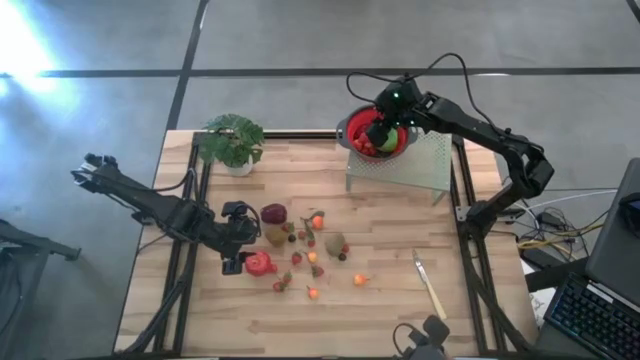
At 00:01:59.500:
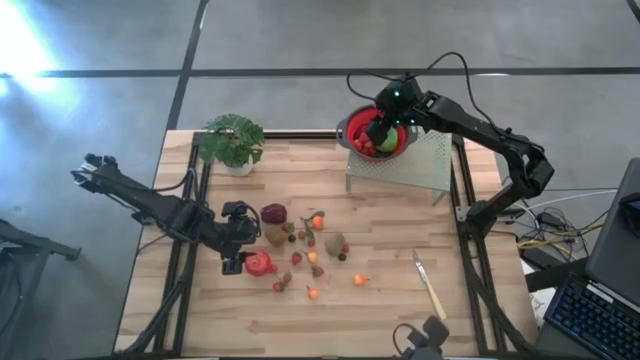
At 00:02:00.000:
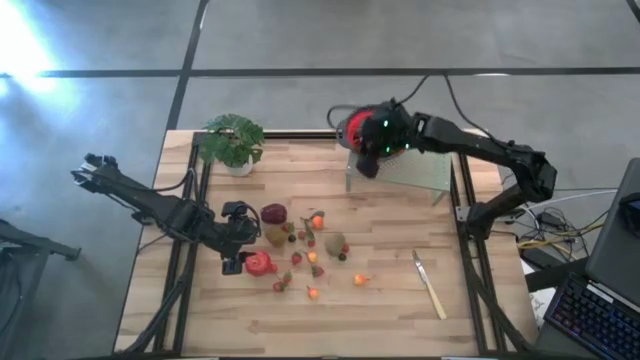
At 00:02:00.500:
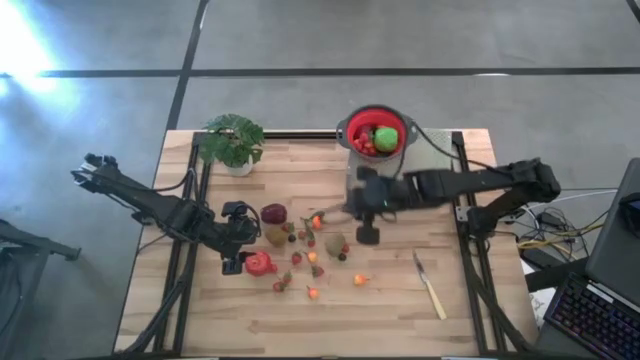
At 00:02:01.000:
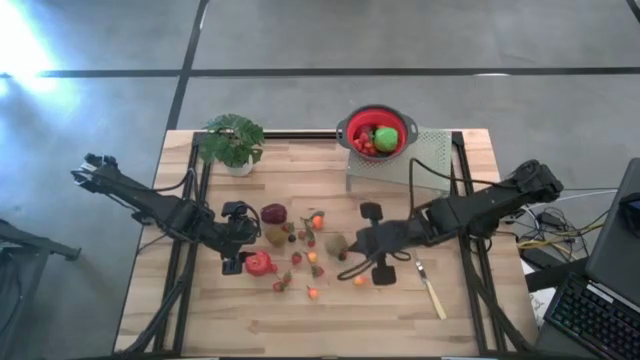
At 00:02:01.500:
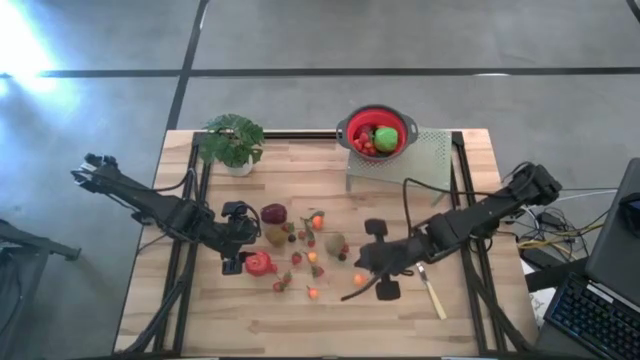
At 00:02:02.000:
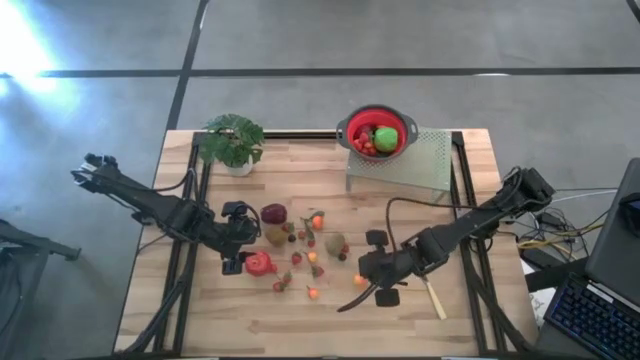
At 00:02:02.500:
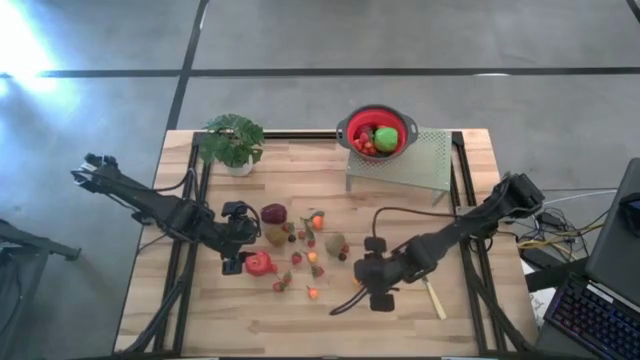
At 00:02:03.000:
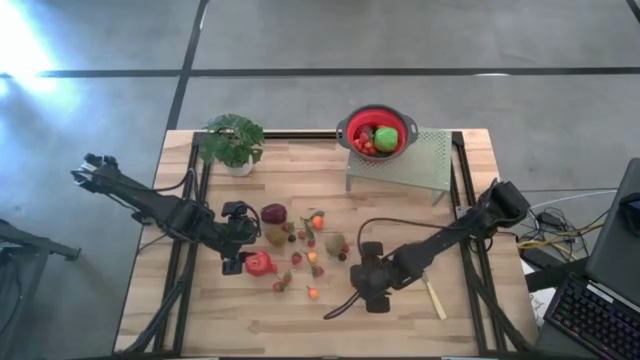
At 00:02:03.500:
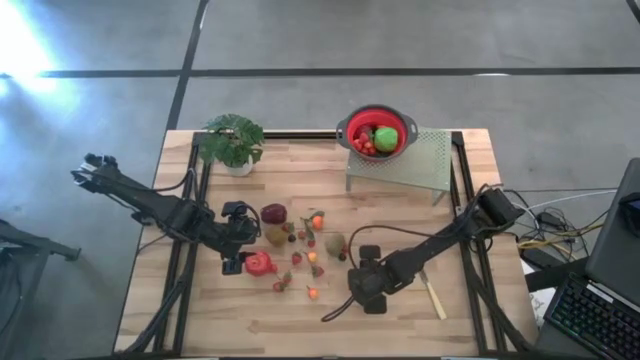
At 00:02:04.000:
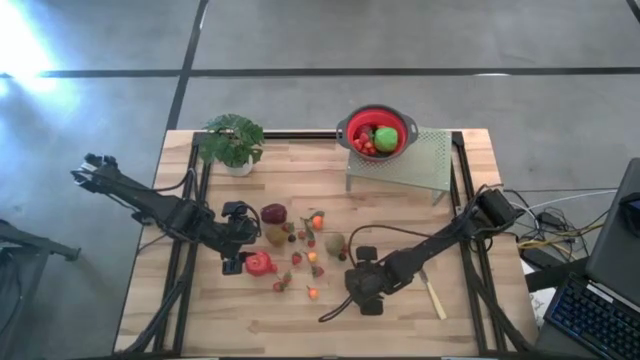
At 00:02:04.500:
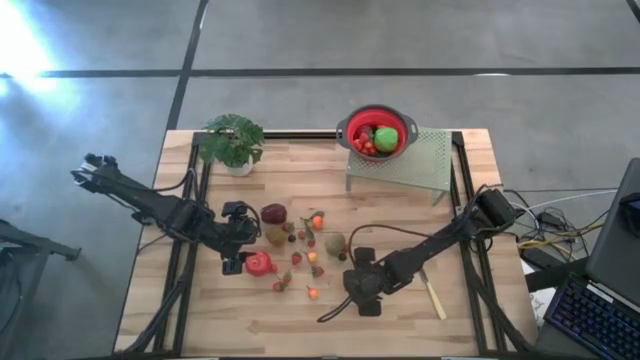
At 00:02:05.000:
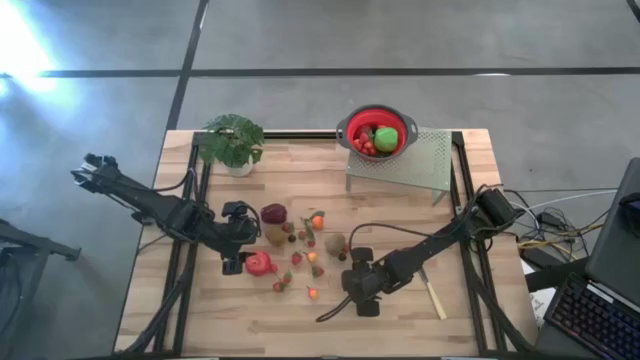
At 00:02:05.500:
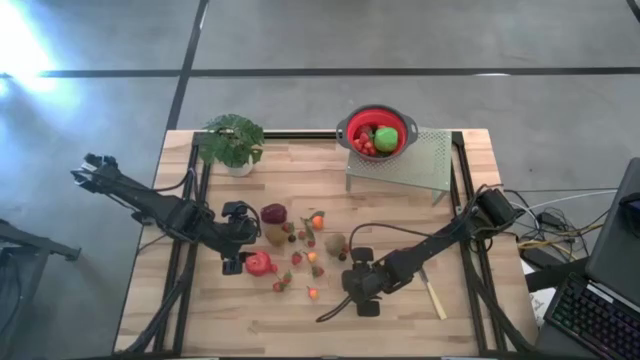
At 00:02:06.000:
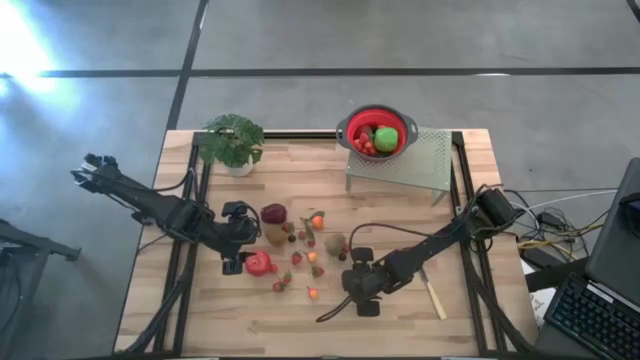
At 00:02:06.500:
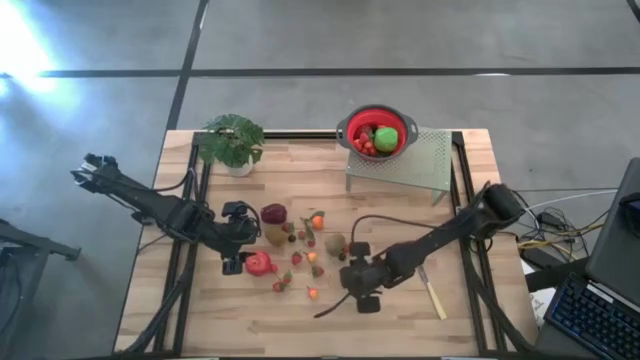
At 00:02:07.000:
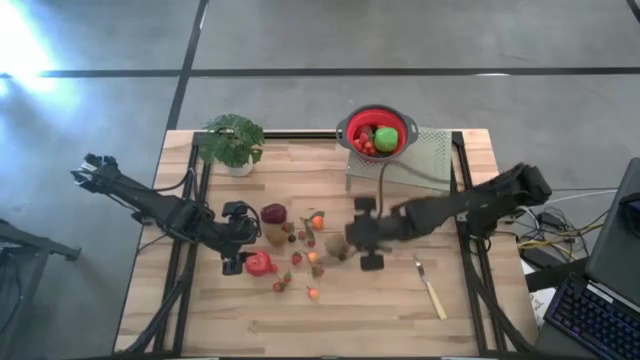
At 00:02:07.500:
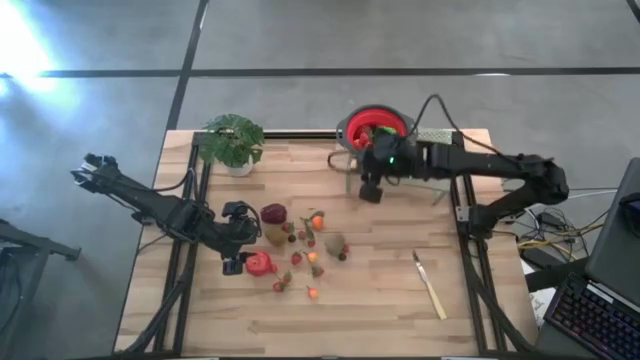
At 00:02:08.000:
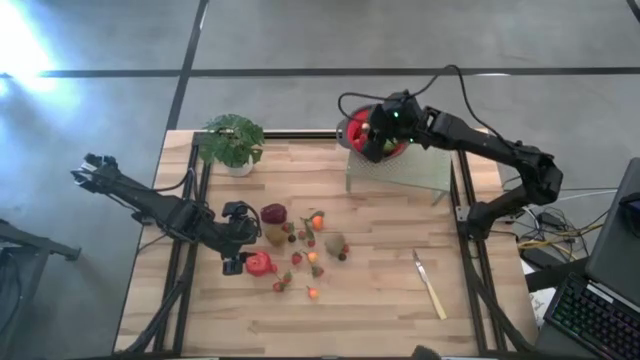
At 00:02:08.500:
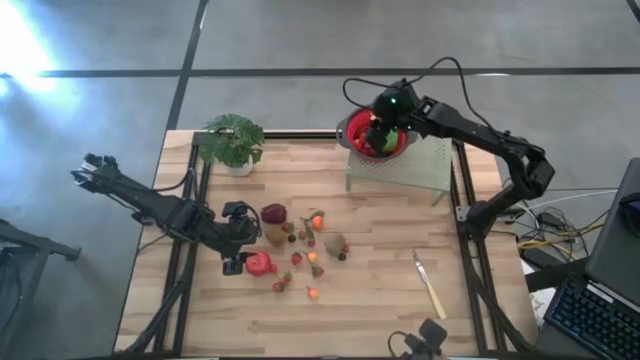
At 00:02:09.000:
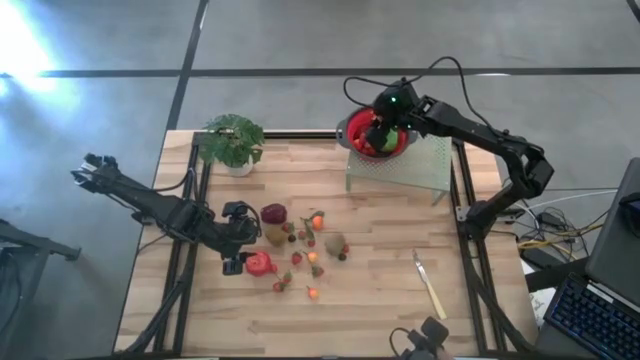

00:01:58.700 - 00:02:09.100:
Task: Pick & Place Fruit
Put the pear into the strainer bowl on the shelf

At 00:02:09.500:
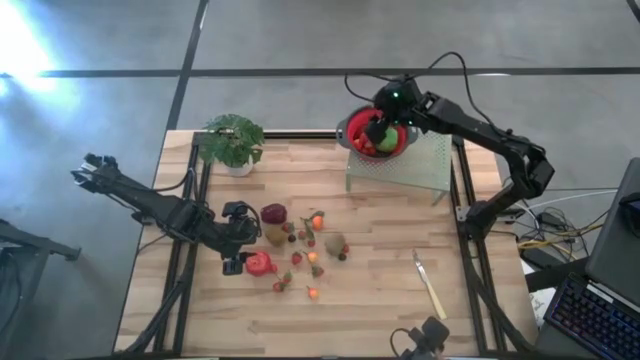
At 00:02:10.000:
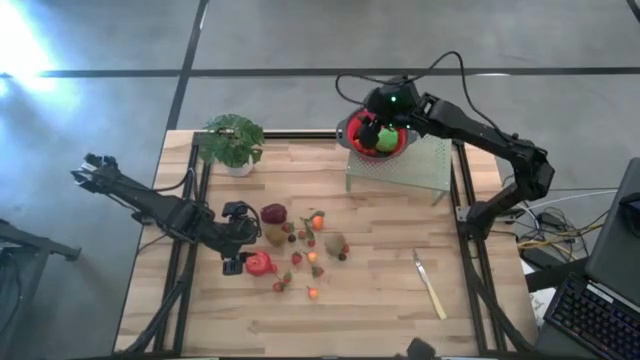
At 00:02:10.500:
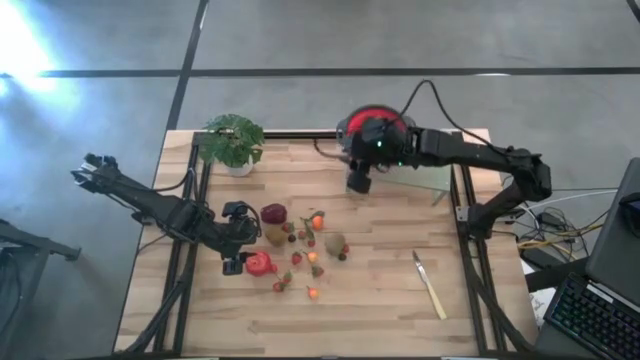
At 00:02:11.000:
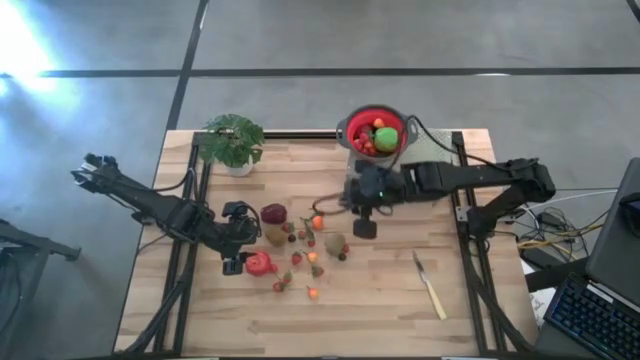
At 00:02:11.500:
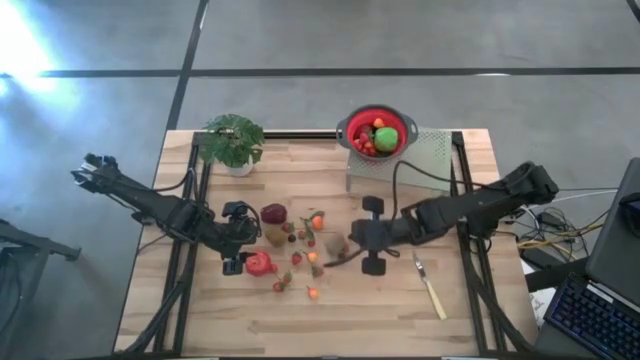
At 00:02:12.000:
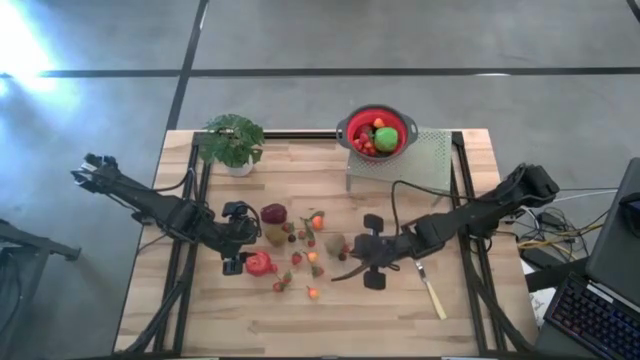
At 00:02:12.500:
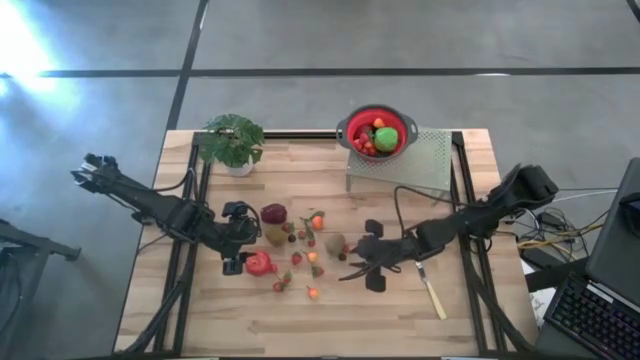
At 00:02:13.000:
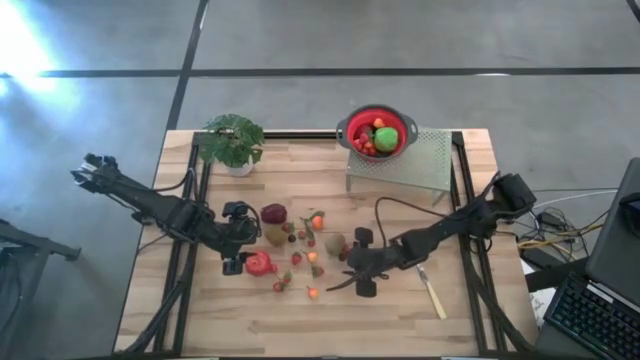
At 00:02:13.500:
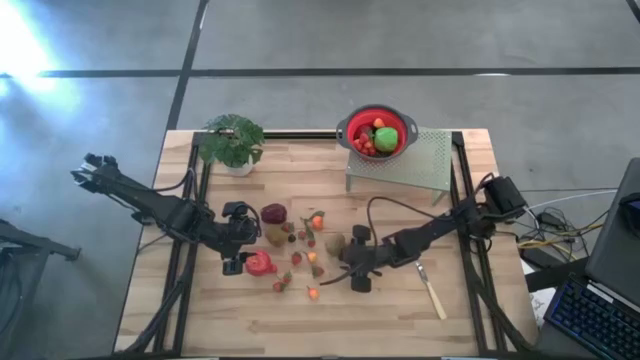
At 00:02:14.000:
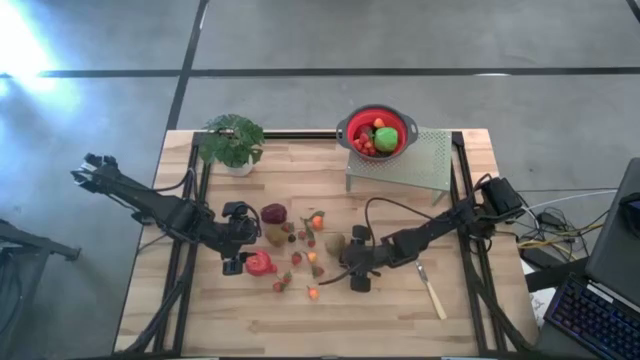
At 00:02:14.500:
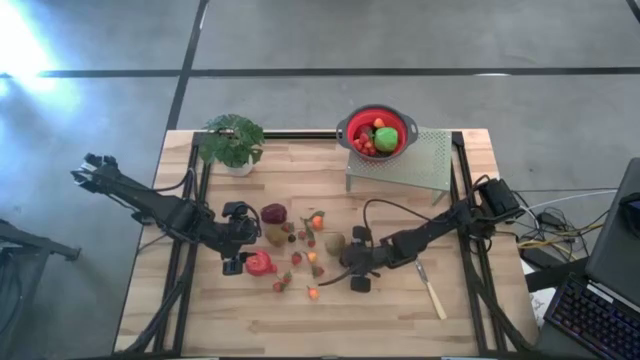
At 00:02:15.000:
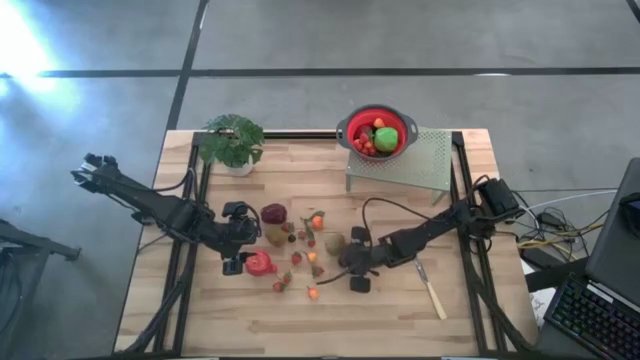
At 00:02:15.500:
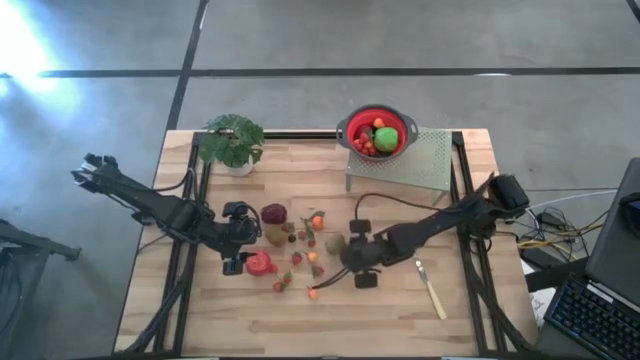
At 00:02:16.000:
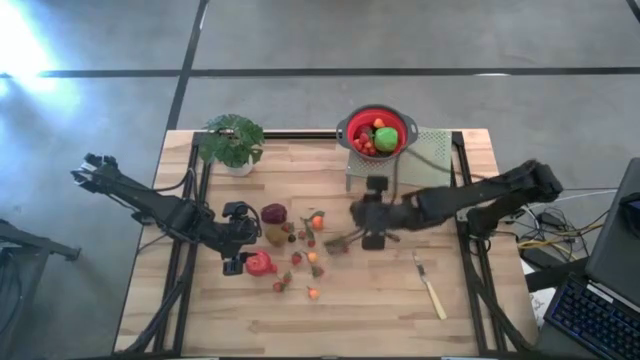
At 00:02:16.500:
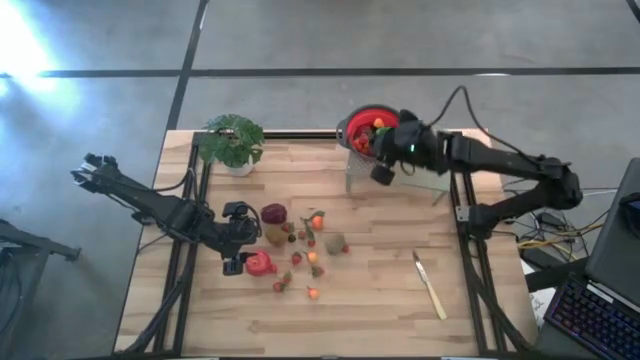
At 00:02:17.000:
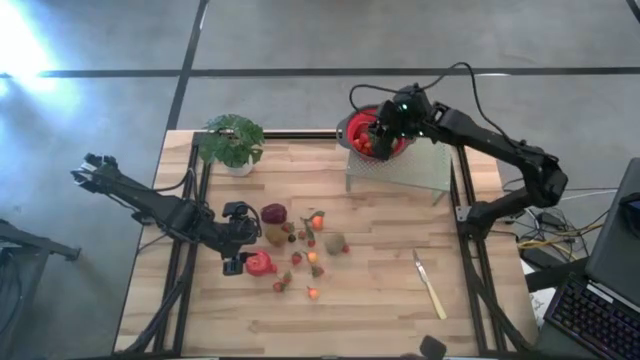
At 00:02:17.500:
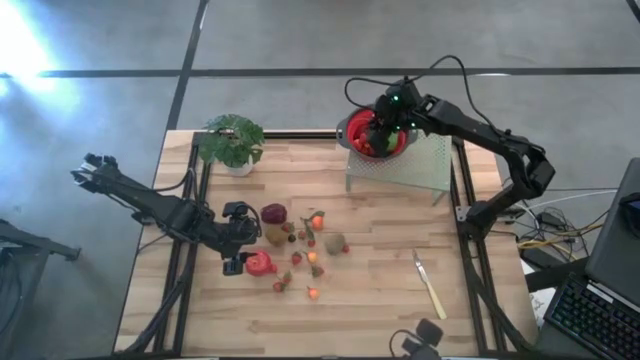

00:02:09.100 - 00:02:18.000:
Put the black cherry into the strainer bowl on the shelf
